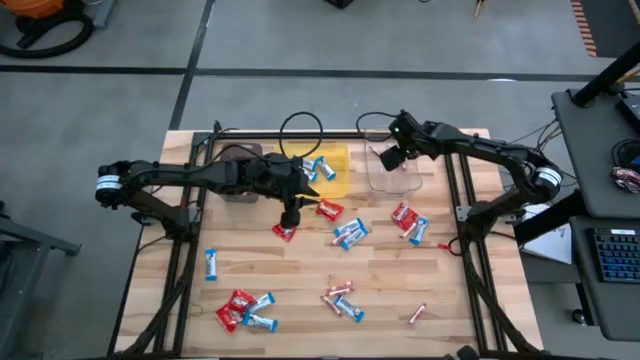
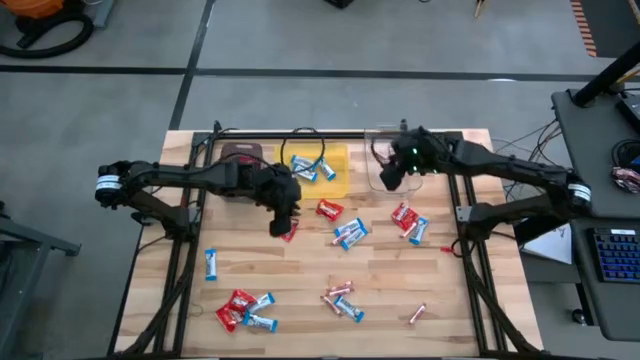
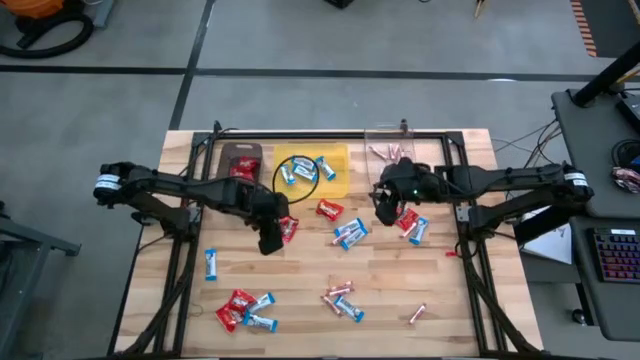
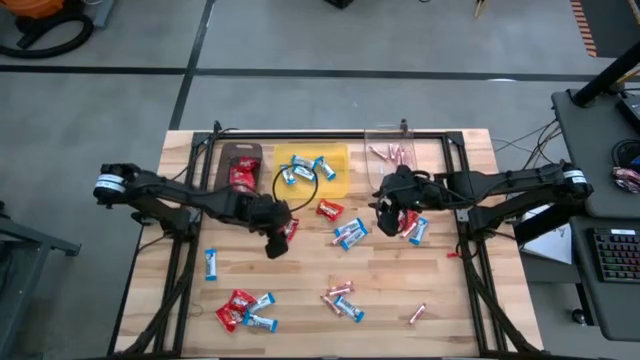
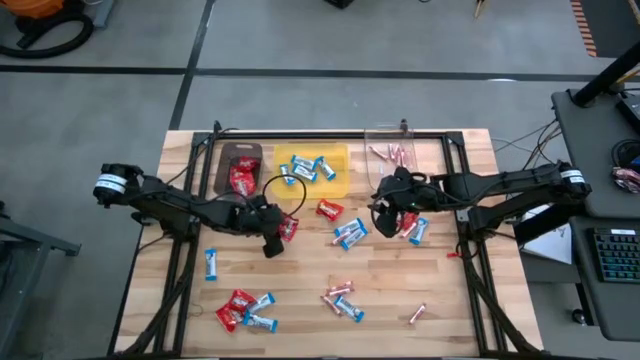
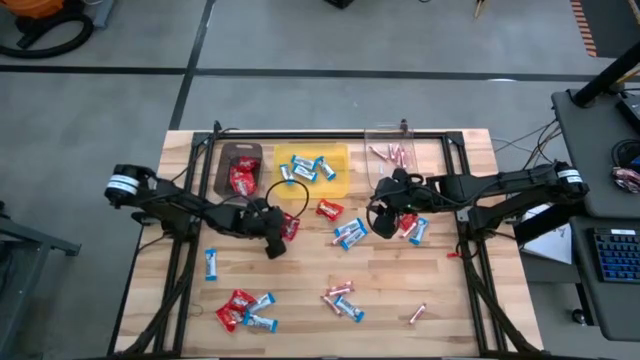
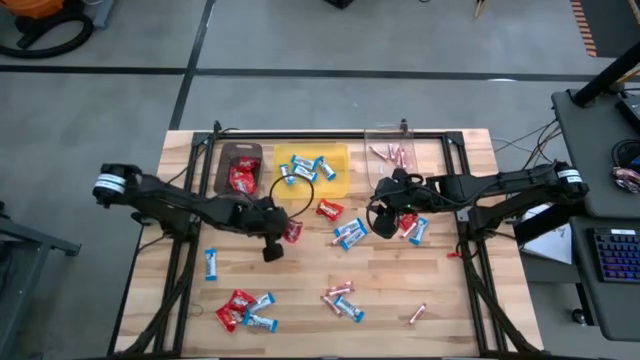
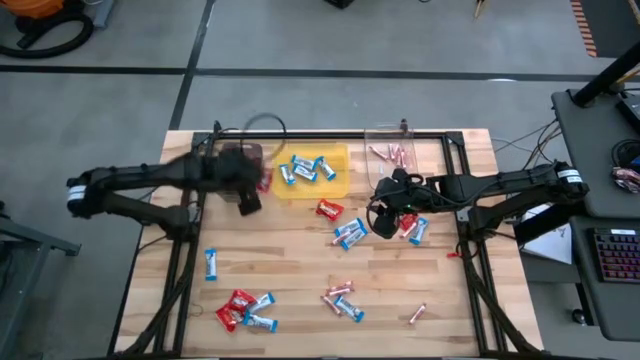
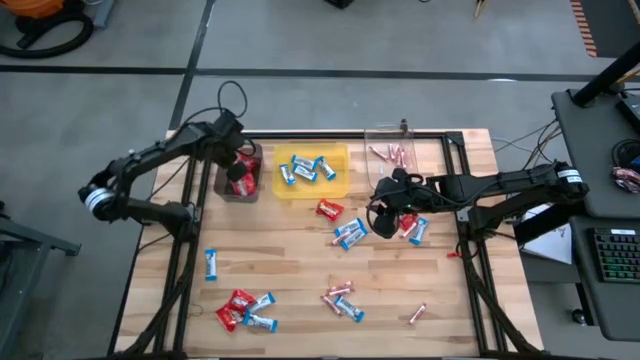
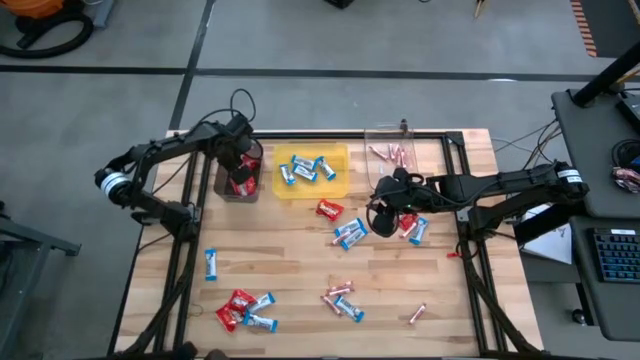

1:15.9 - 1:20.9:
Task: Sort candy
Put the red candy into the black bin

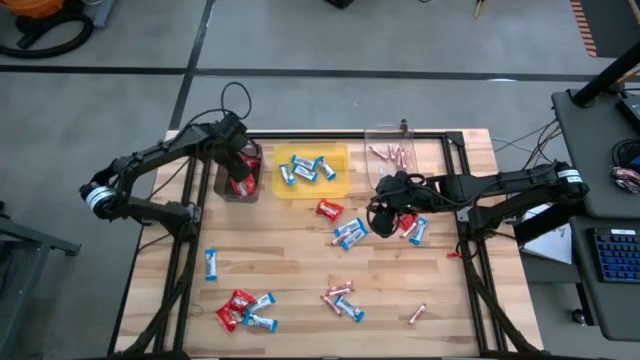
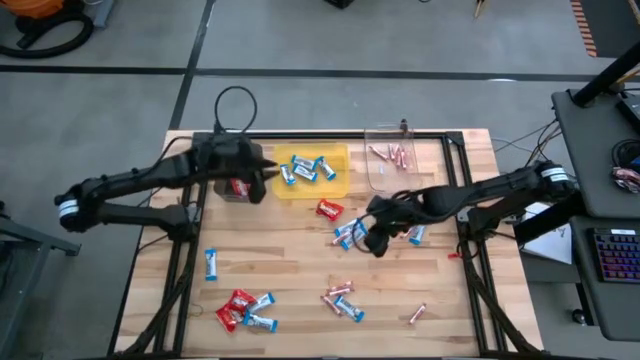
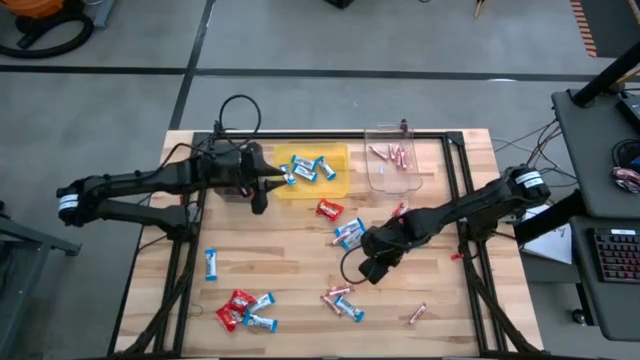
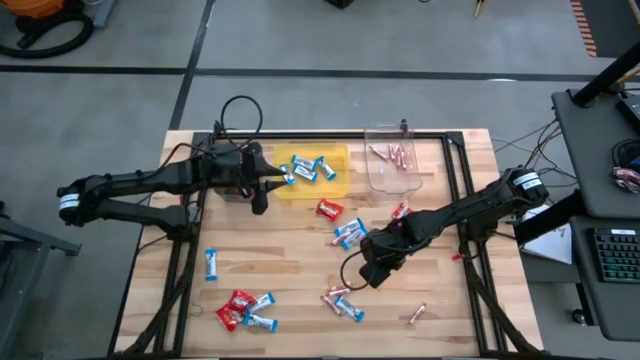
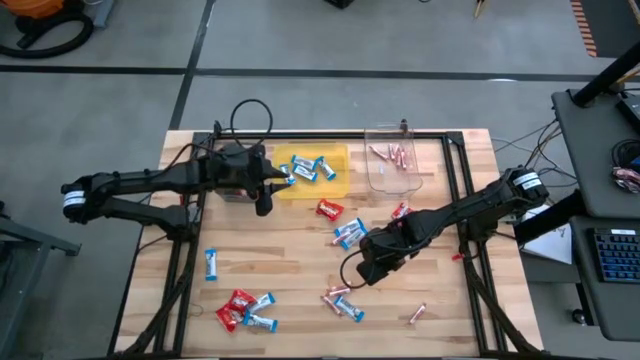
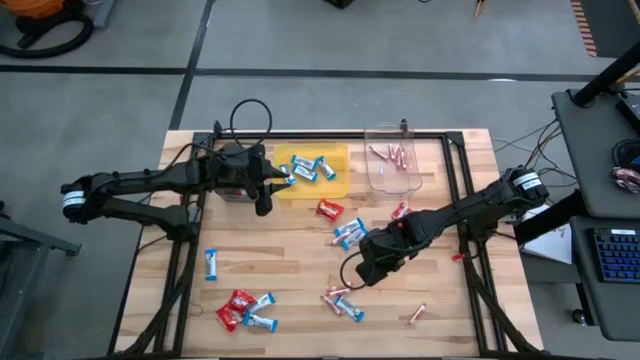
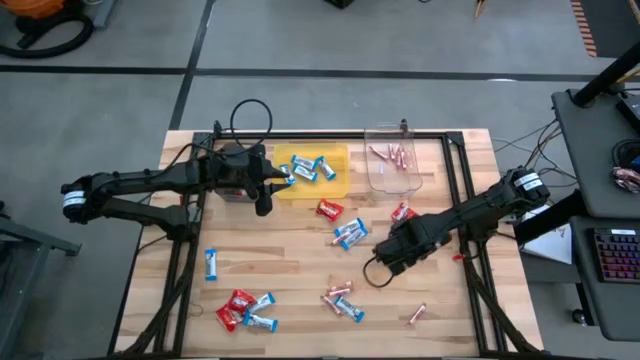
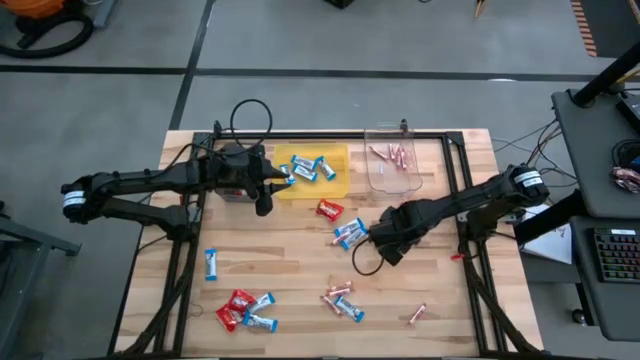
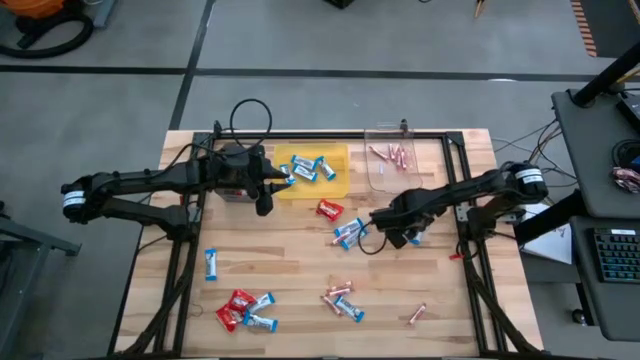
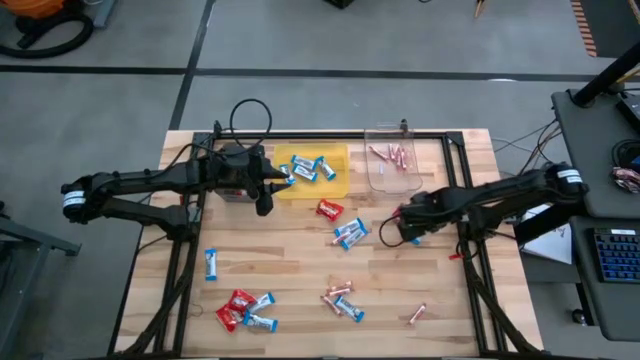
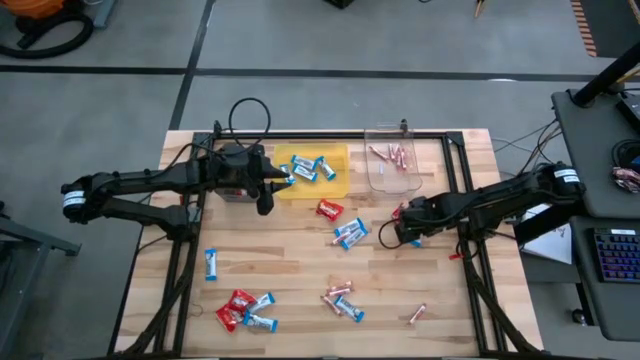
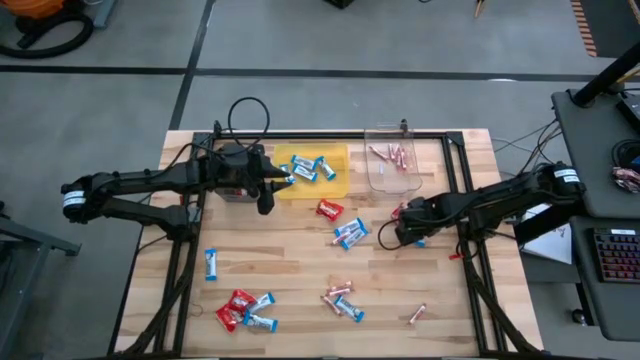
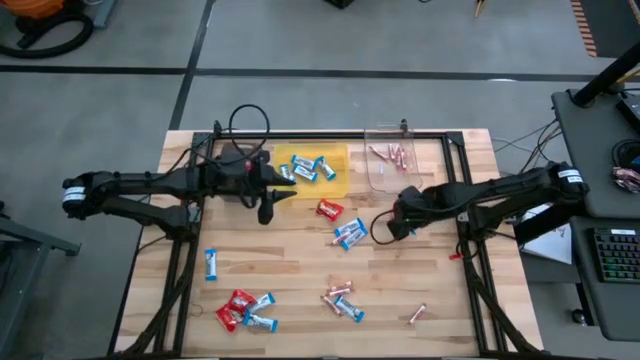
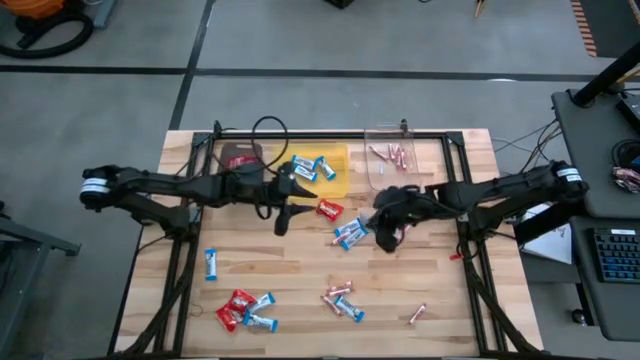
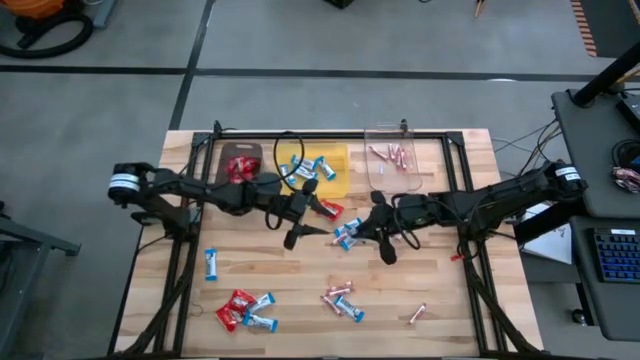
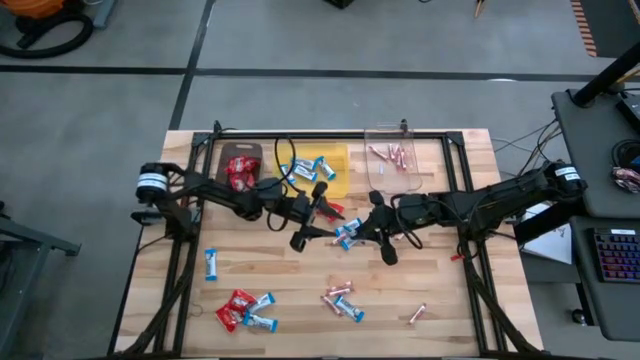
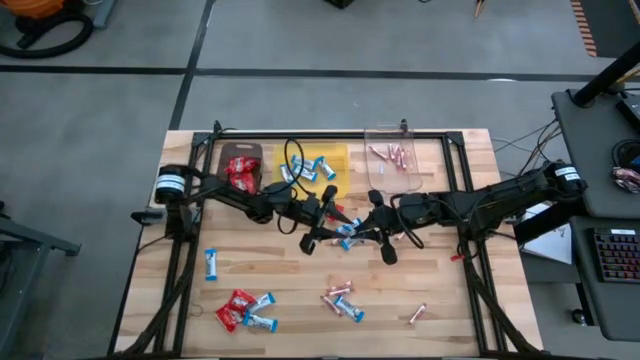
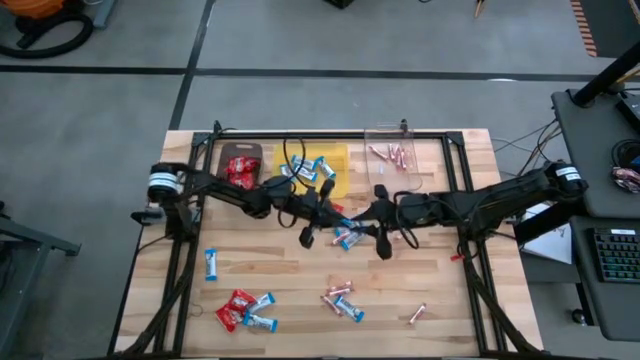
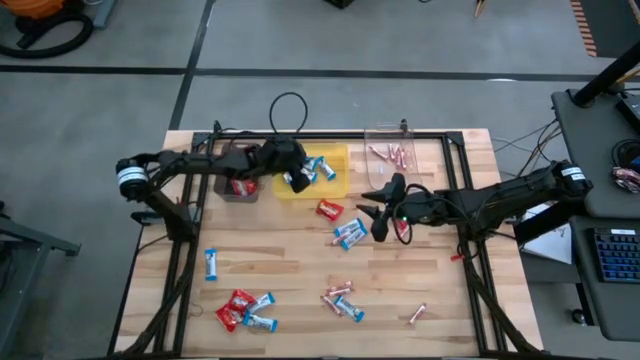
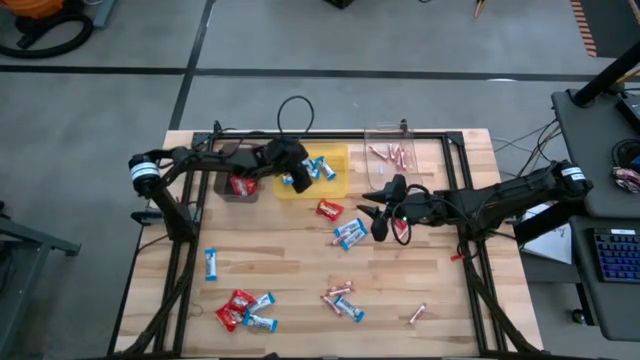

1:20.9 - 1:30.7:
Put the white candy into the yellow bin

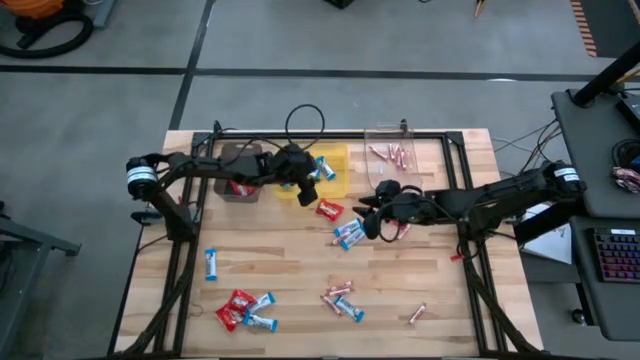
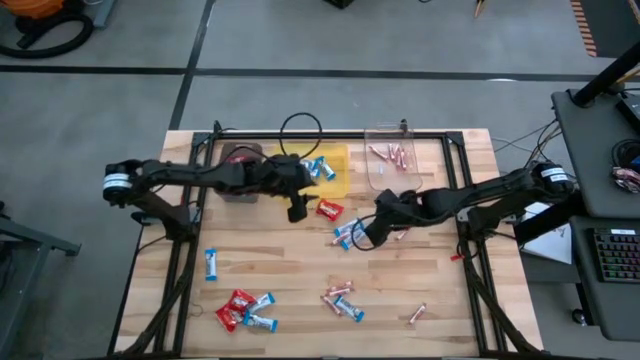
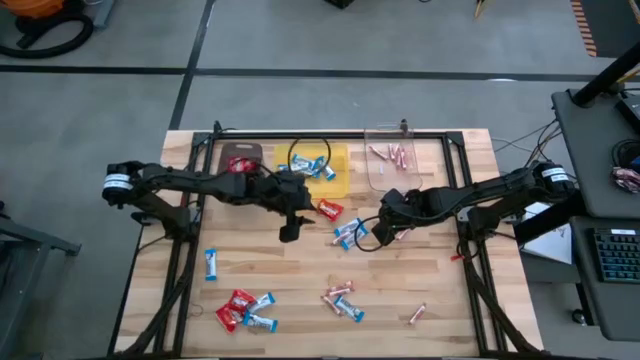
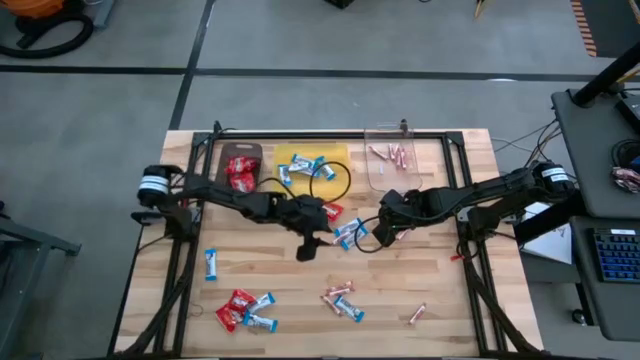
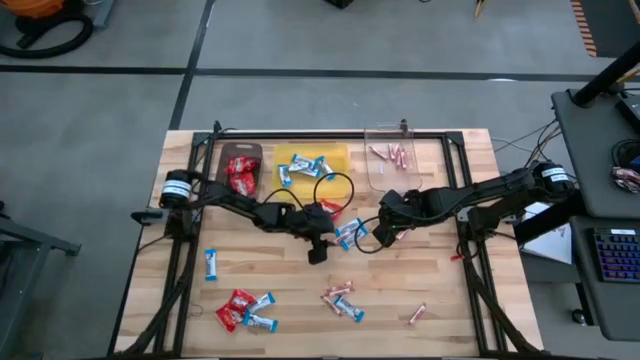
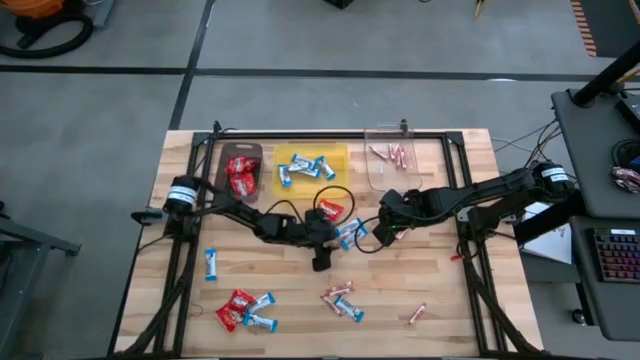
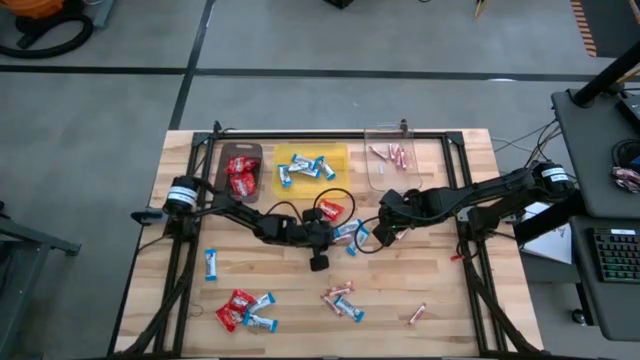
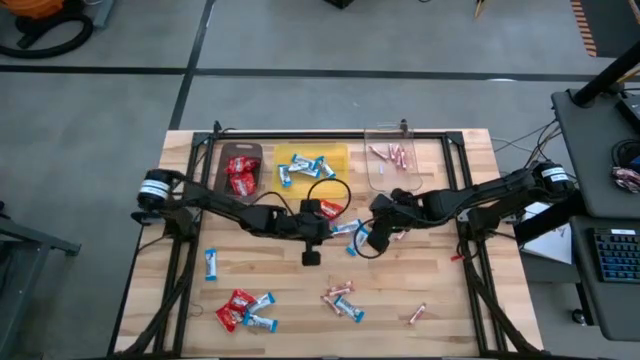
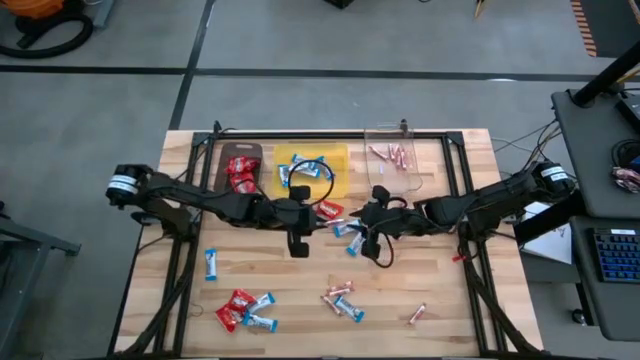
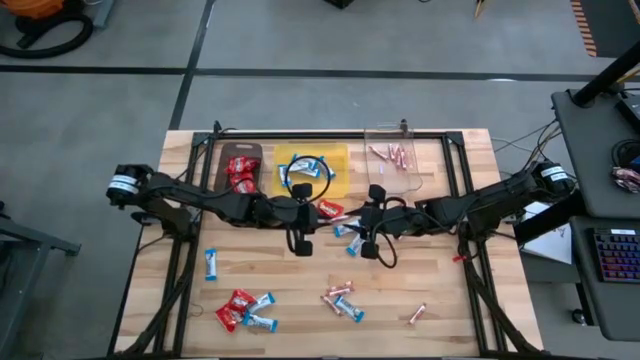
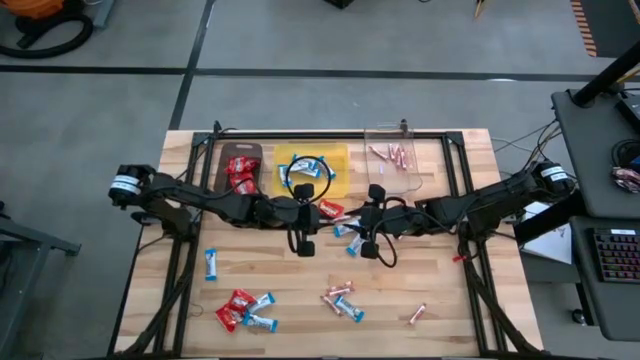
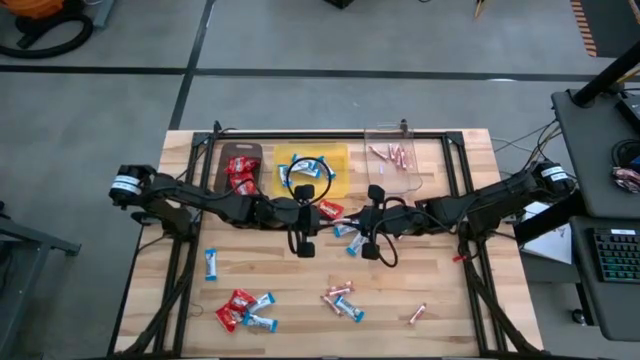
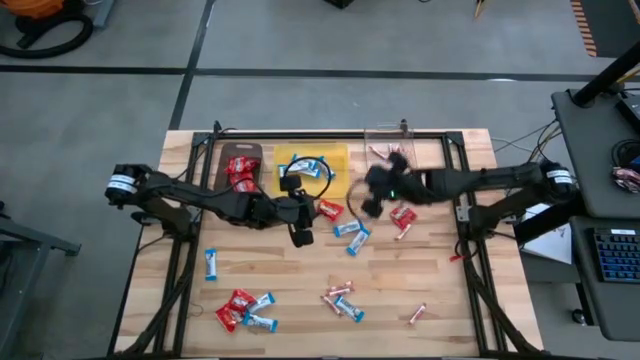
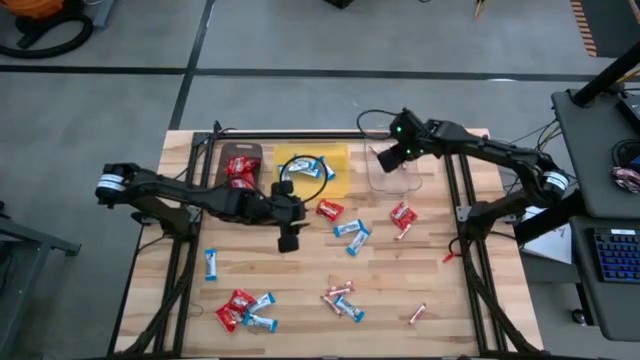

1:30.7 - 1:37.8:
Put the orange candy into the yellow bin
